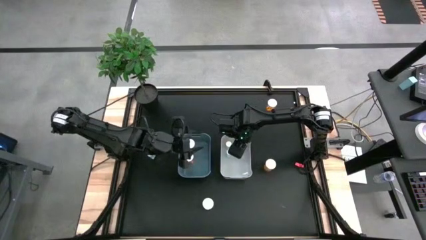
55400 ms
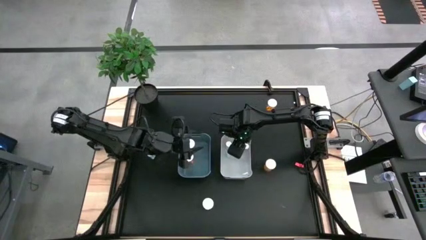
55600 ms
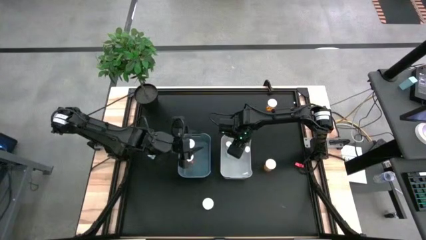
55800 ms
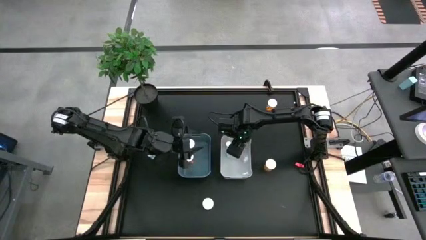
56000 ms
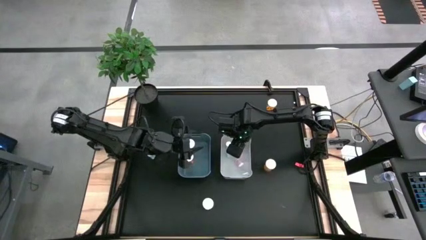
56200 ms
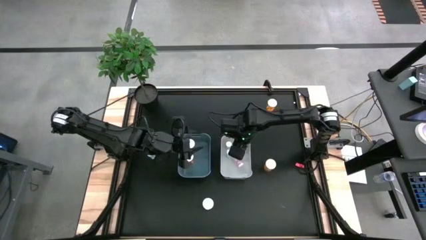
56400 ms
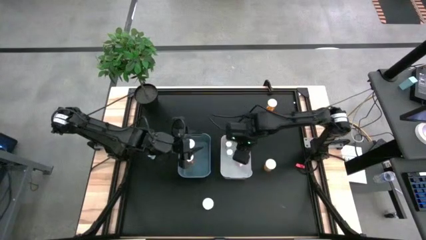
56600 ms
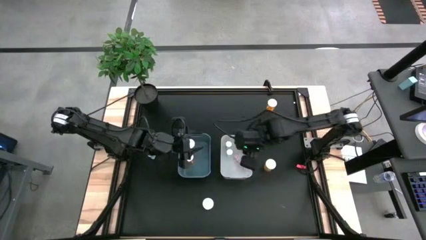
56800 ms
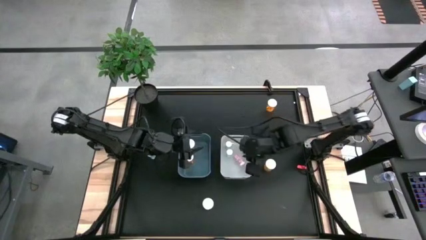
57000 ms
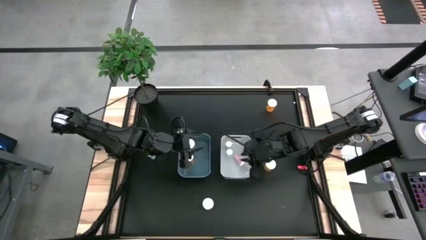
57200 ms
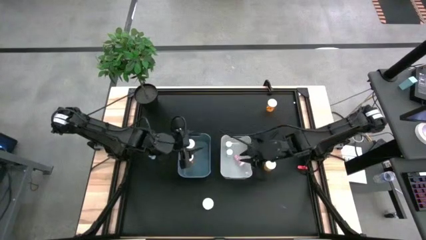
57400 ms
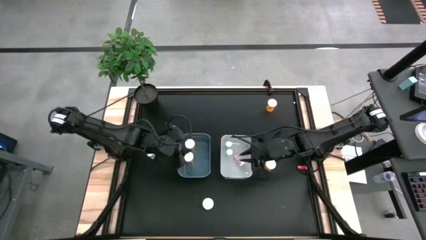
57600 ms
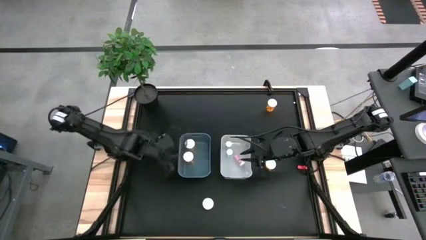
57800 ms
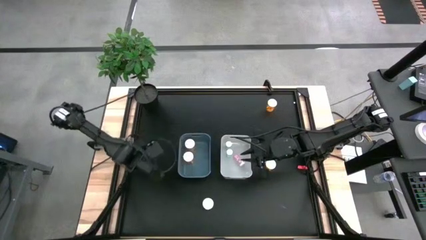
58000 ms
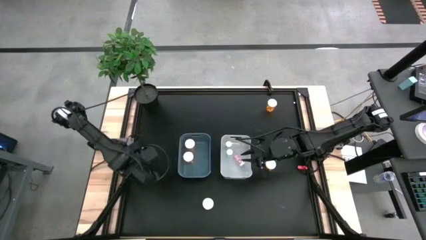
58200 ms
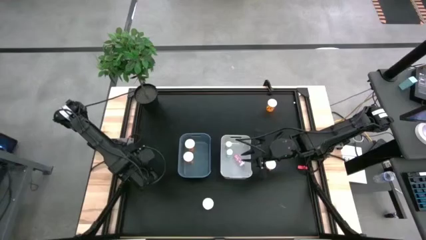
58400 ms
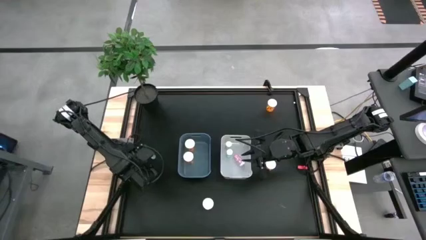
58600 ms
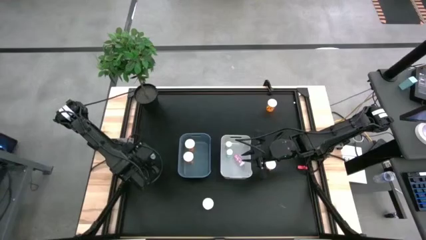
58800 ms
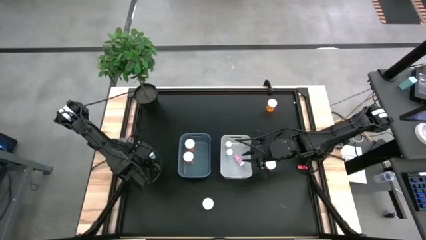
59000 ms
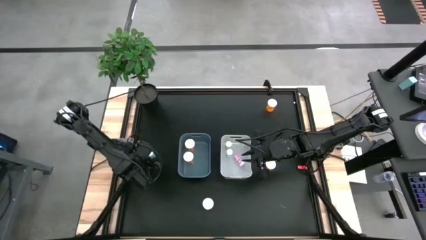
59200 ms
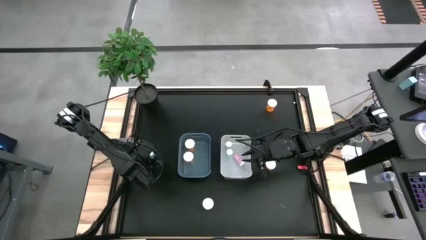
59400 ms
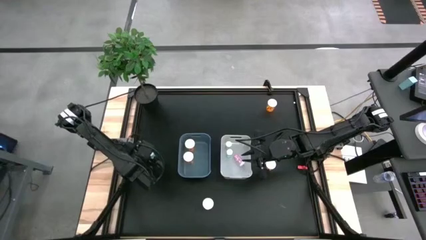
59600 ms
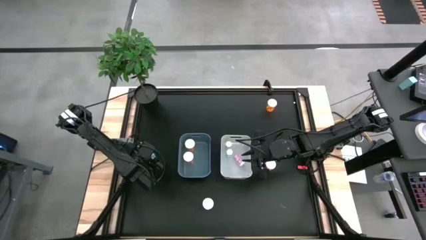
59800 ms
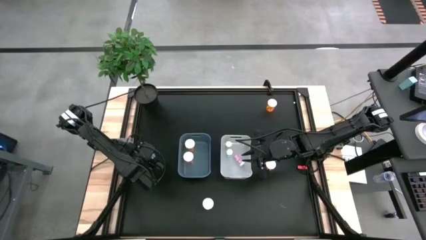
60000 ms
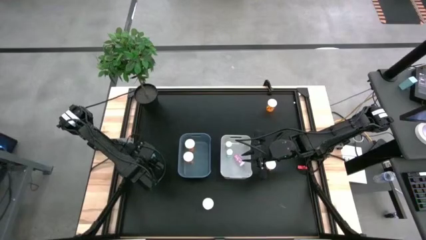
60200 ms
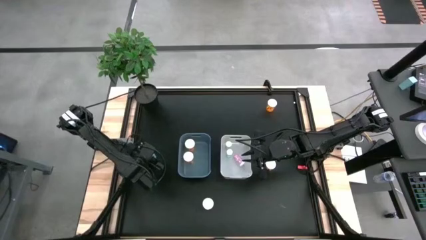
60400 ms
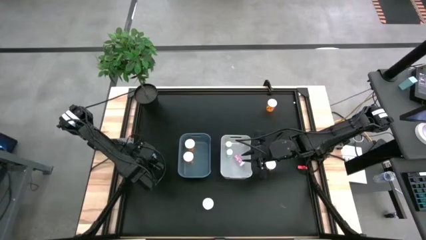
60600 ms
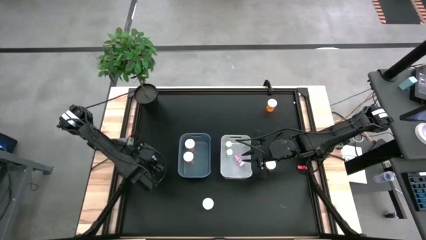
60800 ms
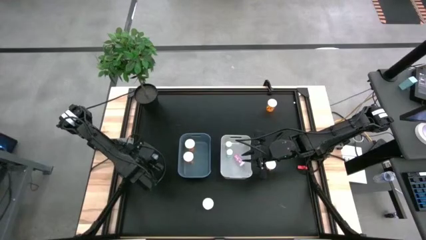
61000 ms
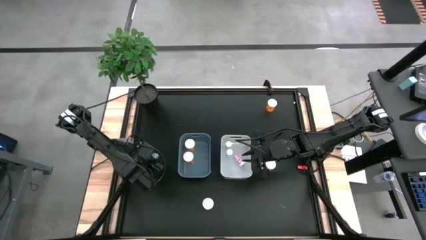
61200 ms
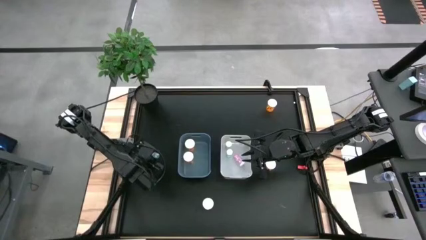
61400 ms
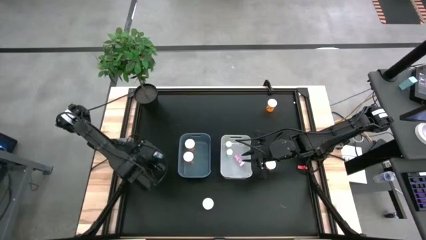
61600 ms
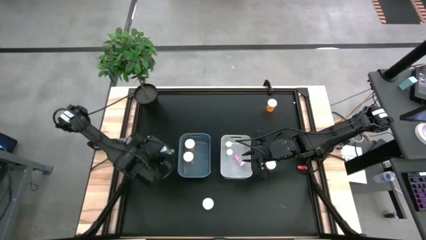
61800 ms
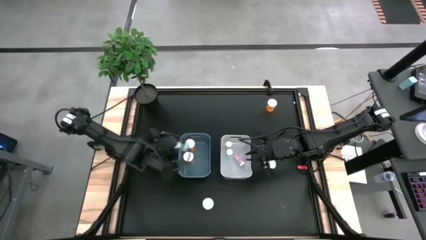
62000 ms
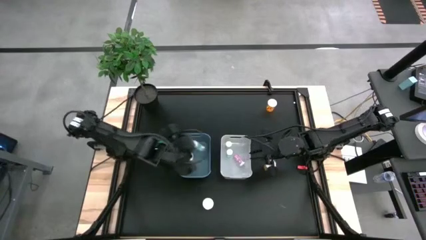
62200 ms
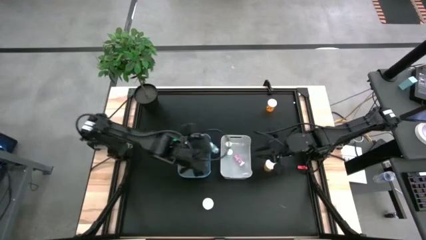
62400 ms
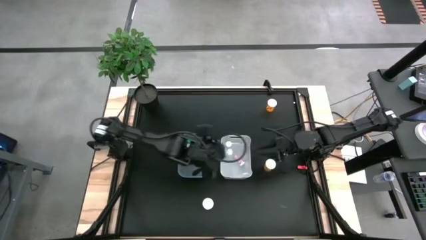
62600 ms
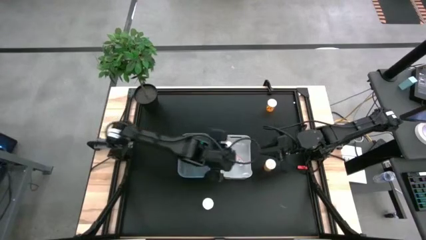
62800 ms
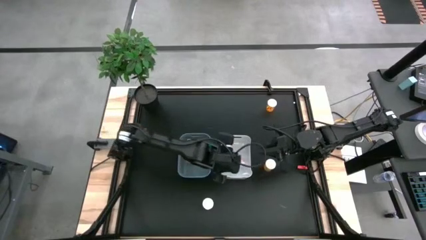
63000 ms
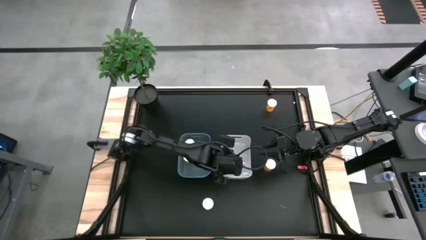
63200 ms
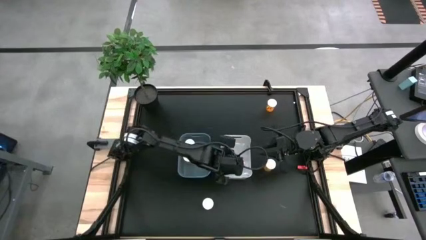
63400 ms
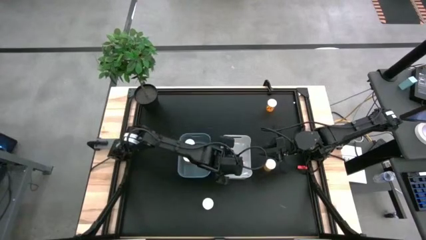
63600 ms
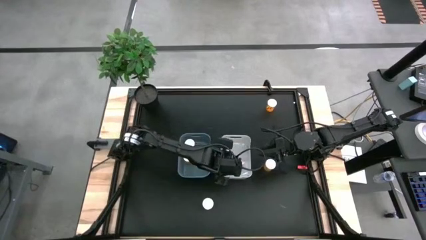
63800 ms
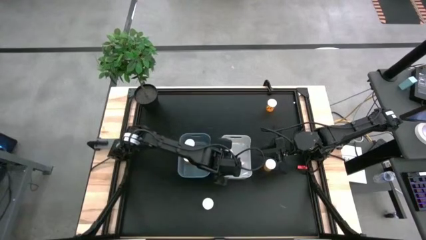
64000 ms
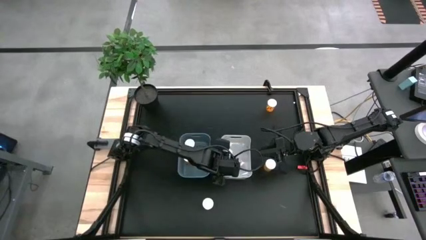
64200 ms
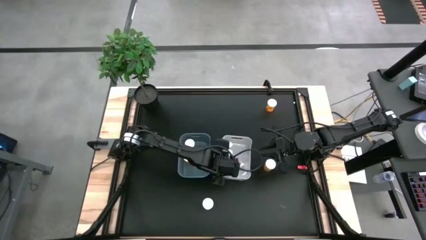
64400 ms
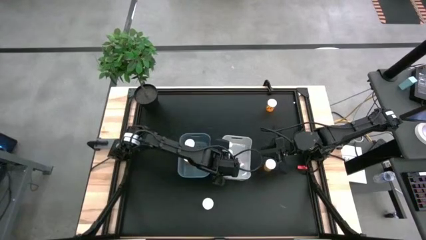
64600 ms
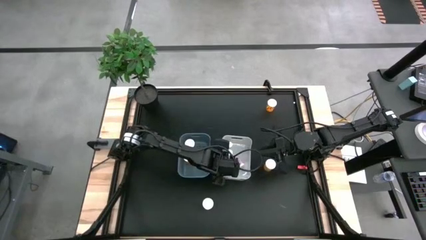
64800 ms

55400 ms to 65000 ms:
Task: Pick and place medicine bottles into bin by pill shape (circle, oval)
Put the blue tablet bottle into the white bin

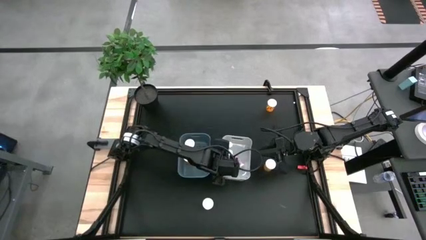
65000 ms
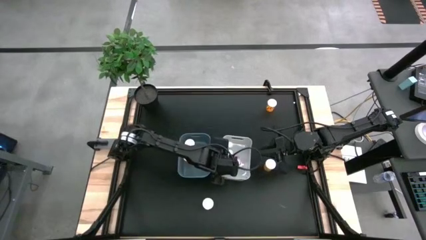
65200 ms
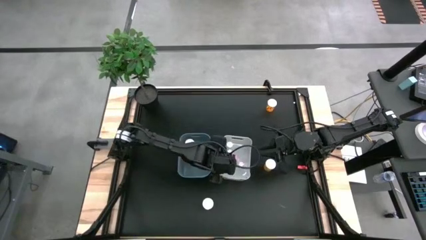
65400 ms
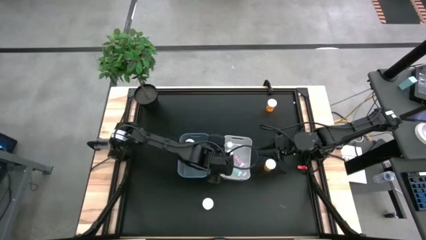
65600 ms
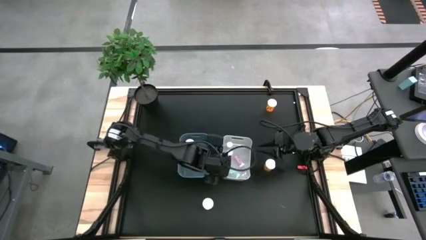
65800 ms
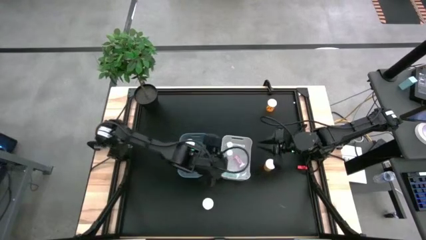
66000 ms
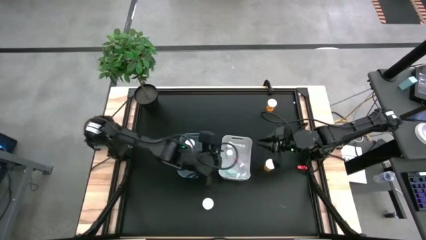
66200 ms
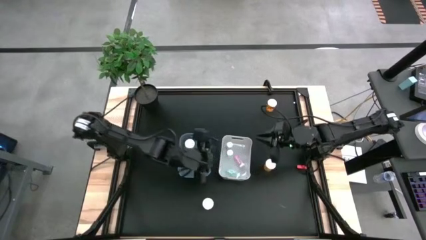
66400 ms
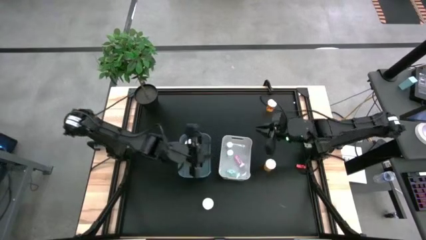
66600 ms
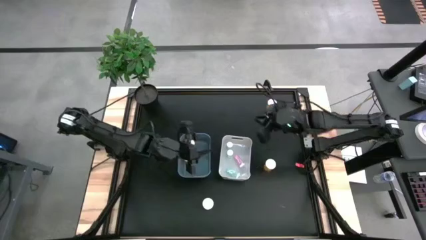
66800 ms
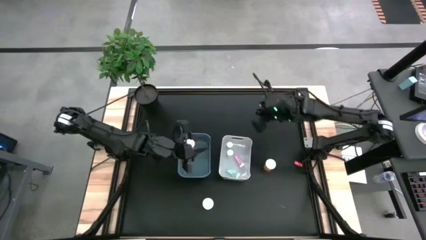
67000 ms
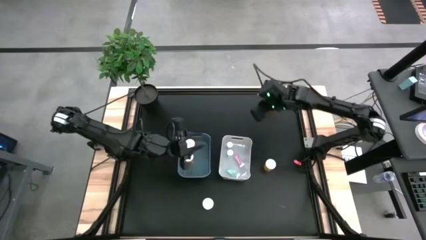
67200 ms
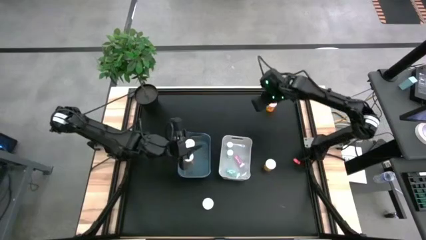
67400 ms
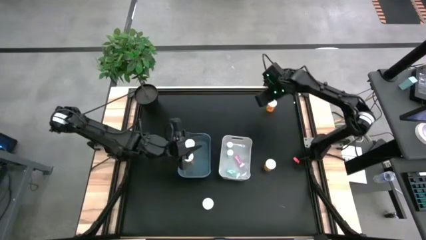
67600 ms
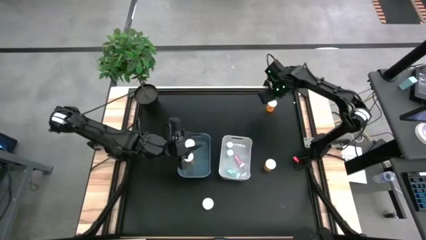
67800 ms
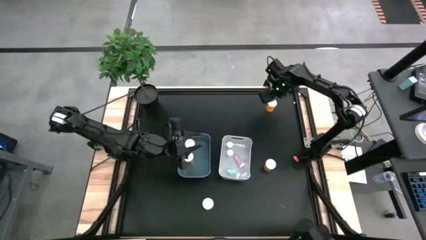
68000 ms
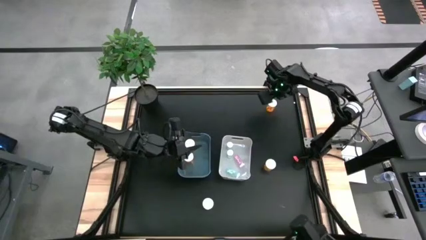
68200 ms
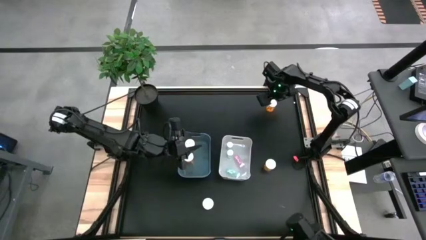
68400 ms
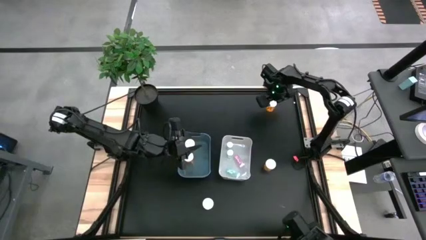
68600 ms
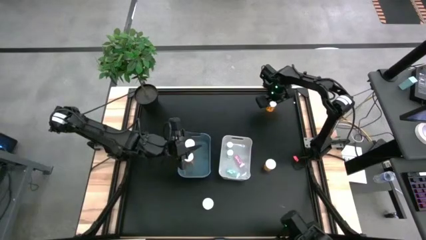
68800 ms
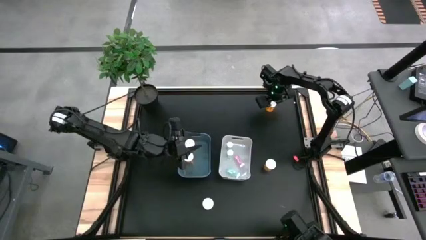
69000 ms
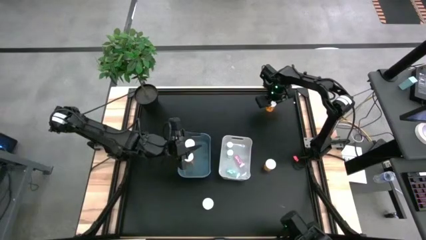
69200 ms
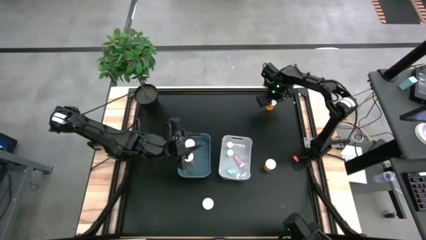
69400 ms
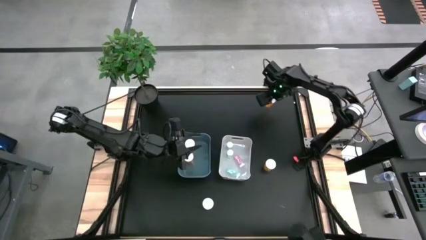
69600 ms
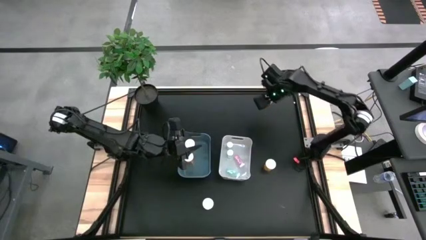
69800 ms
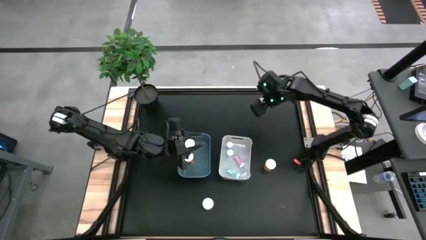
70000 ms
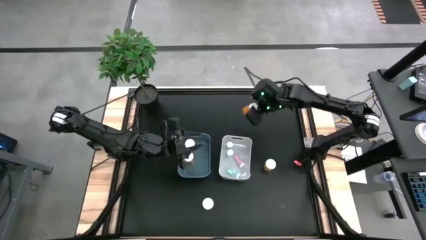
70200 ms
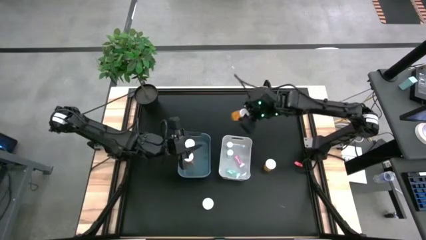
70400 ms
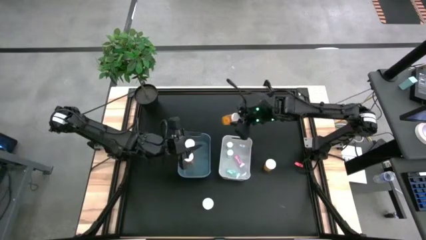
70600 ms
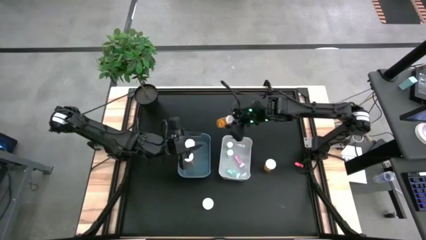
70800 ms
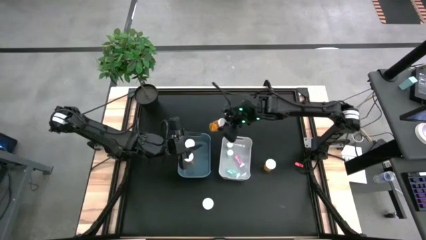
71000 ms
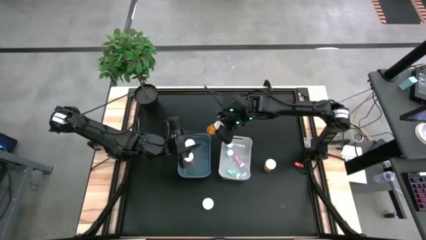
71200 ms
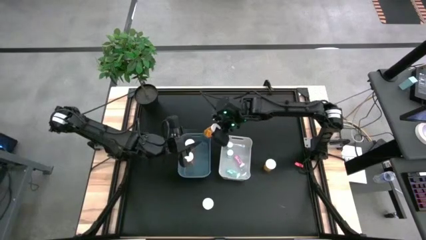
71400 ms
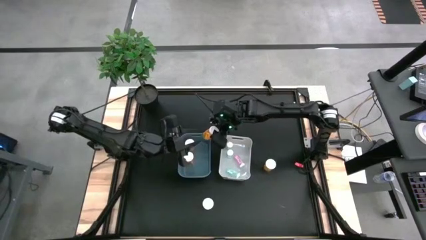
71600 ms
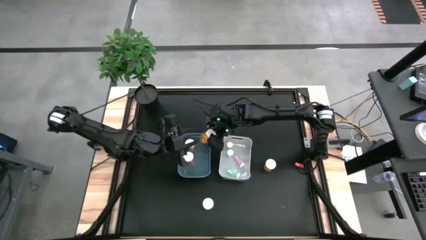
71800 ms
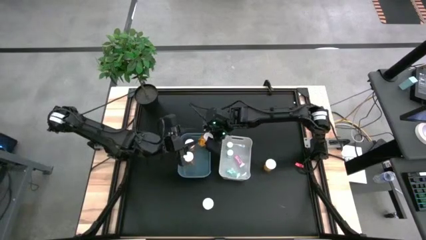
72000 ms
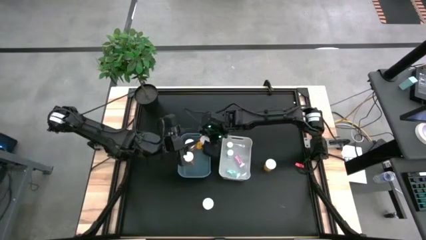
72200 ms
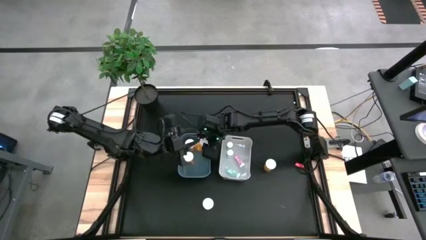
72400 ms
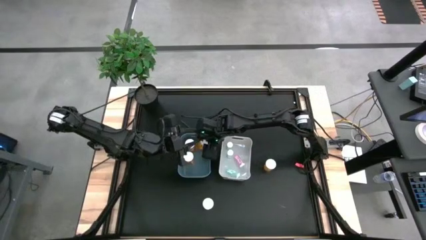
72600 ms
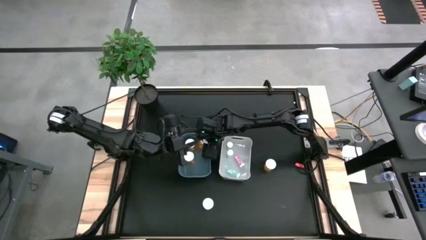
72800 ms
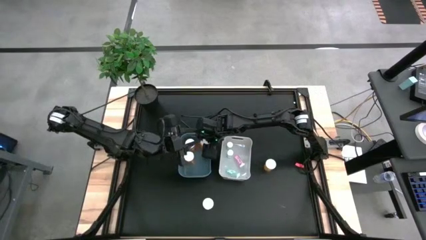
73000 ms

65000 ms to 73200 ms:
Put the orange capsule bottle into the blue bin
